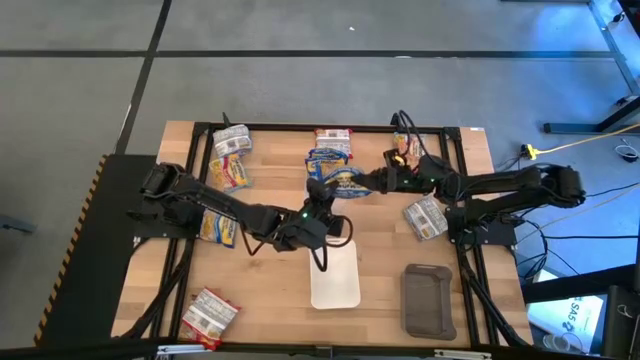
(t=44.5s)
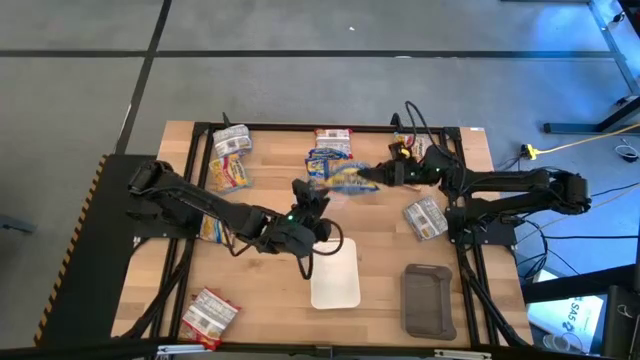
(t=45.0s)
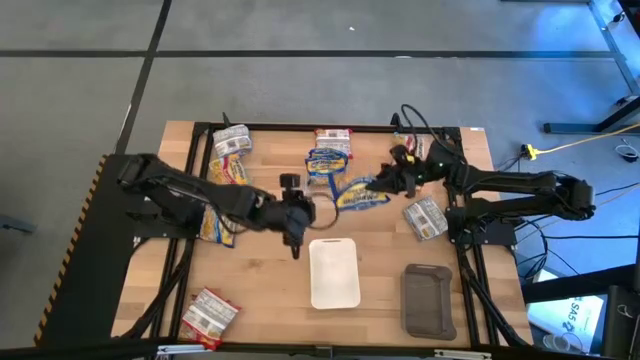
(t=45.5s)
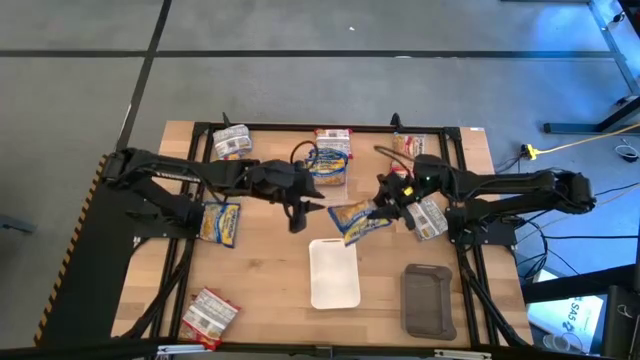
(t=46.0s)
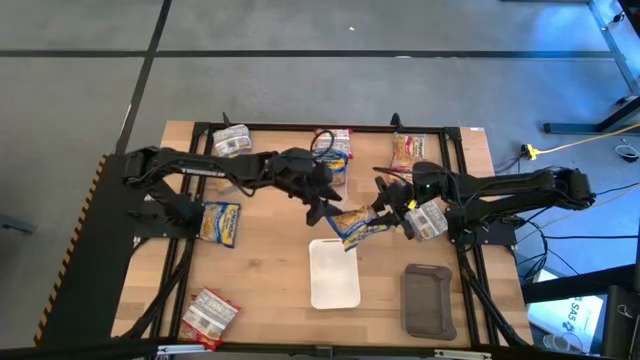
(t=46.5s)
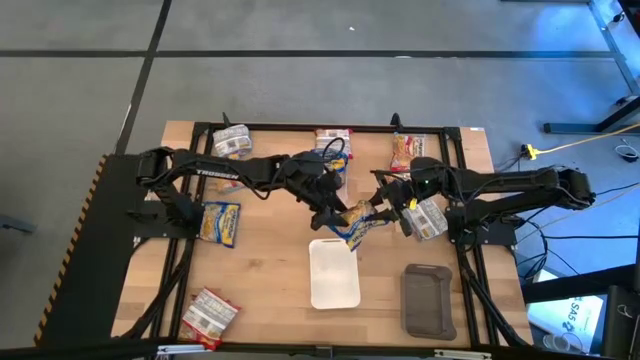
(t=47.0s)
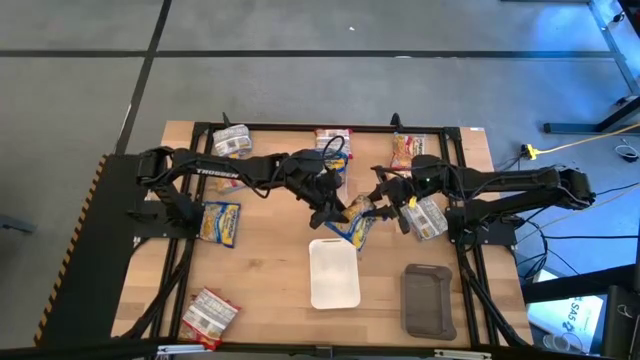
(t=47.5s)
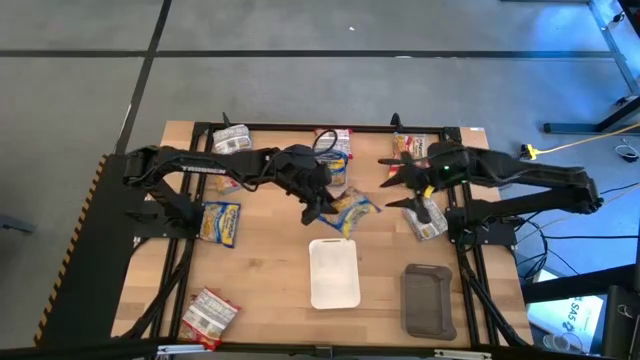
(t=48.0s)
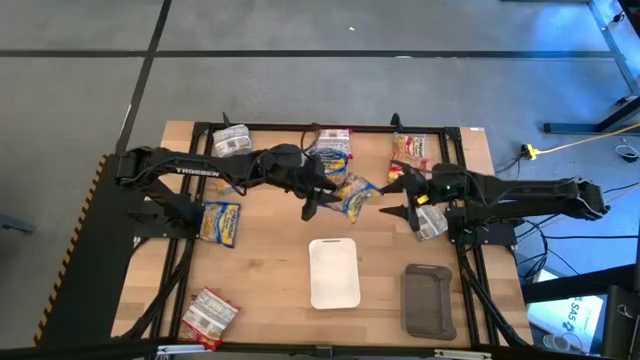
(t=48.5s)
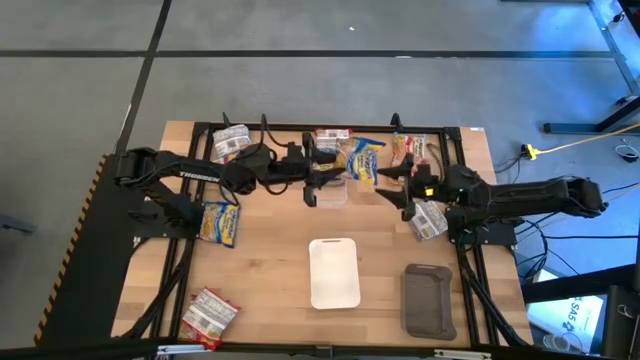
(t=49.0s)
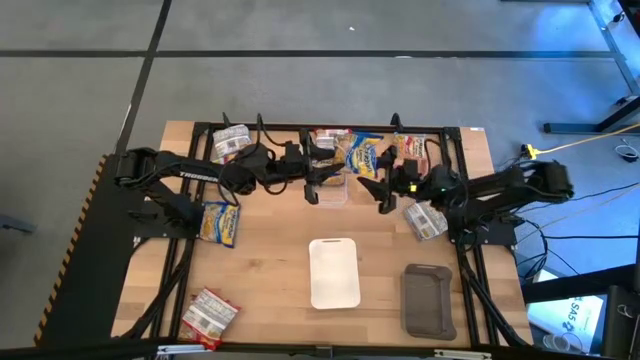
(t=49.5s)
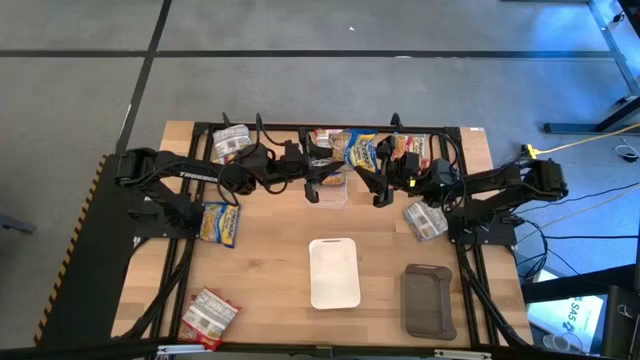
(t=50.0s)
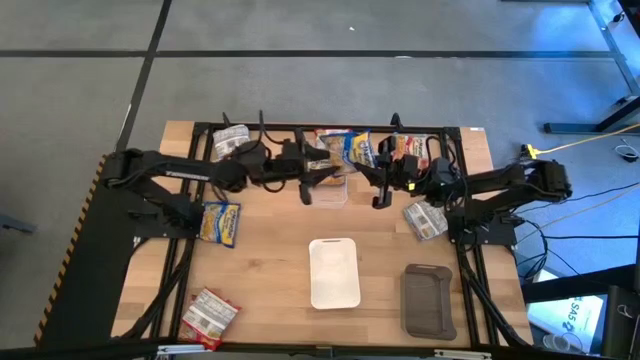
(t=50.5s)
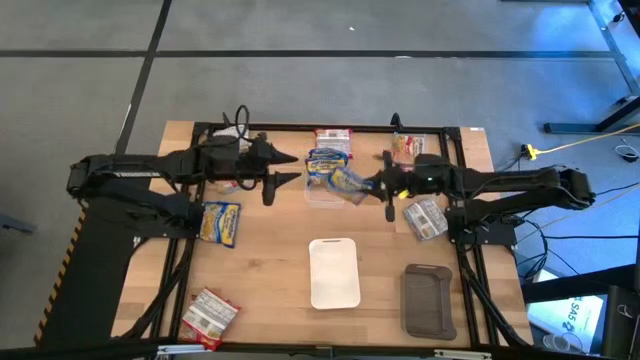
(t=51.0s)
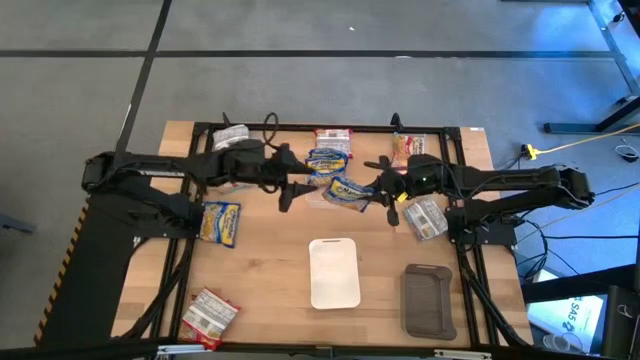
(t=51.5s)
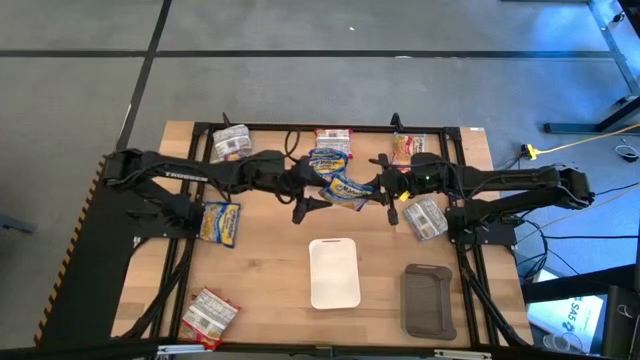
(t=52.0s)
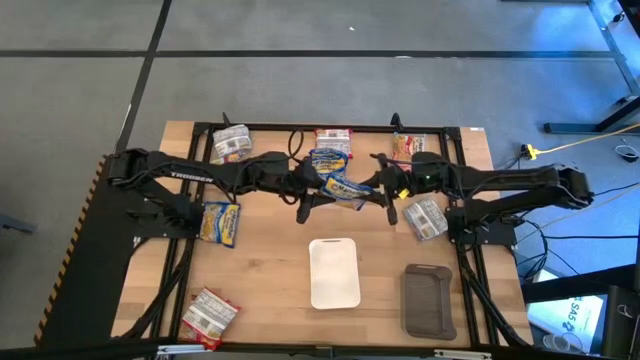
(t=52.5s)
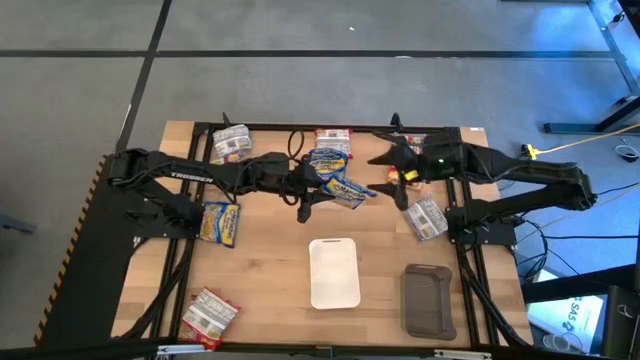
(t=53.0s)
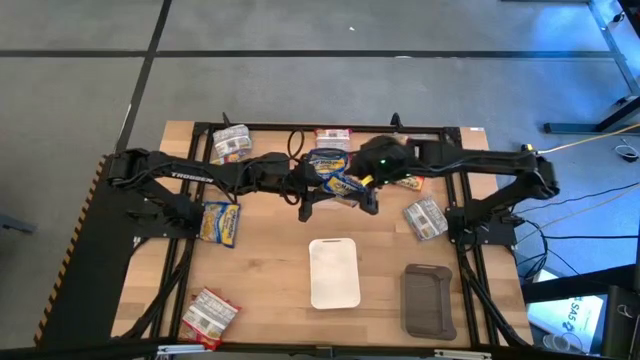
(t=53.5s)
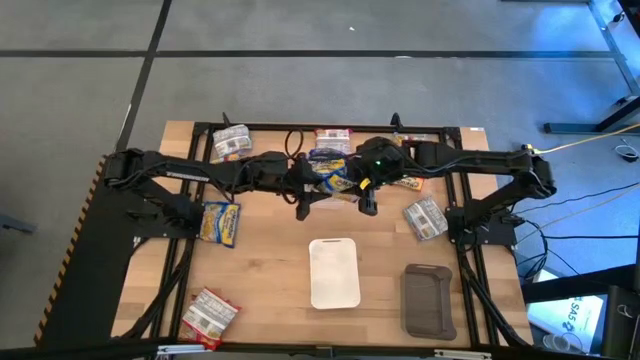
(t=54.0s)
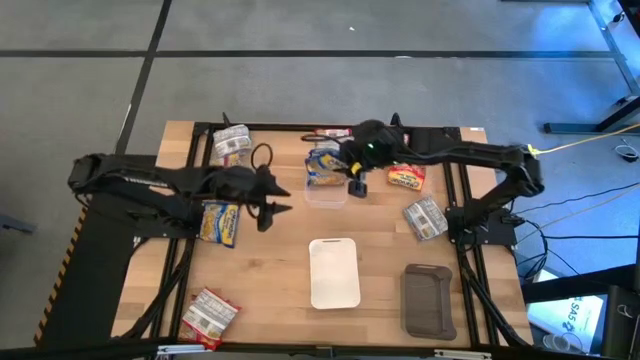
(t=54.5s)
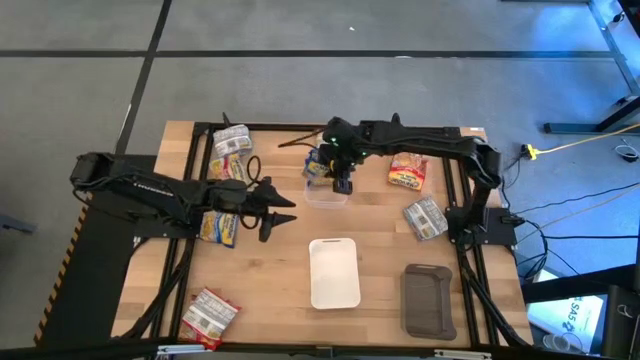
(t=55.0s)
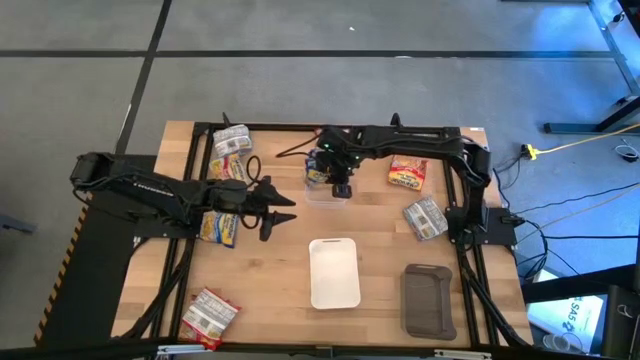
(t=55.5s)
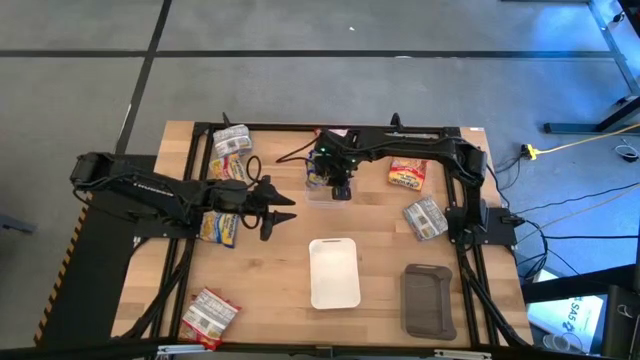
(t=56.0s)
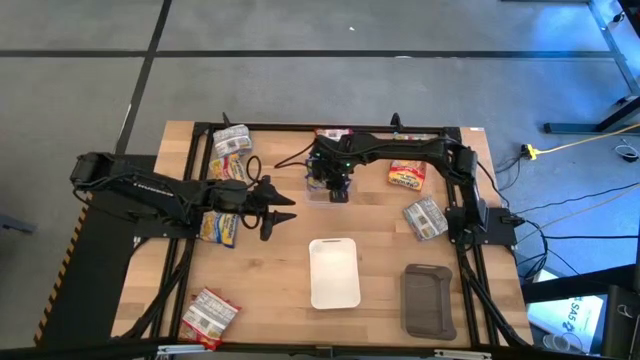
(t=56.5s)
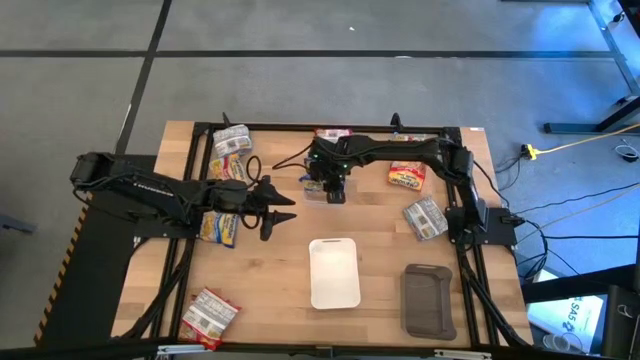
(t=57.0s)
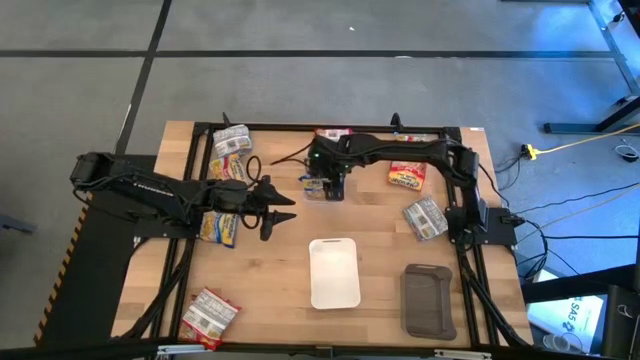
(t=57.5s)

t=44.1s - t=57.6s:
Task: Sort Maruchan noodles
Put the blue noodle pack into the transparent bin

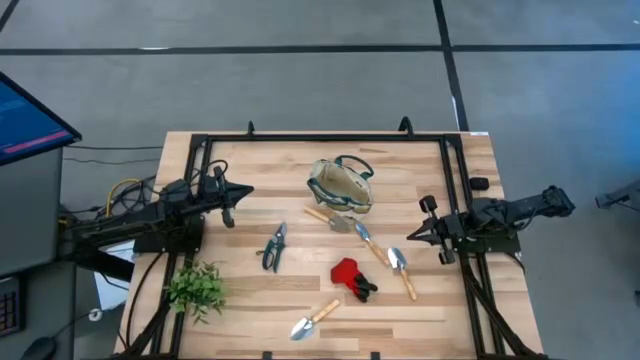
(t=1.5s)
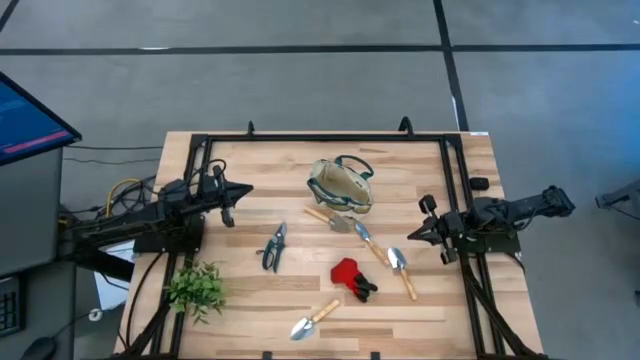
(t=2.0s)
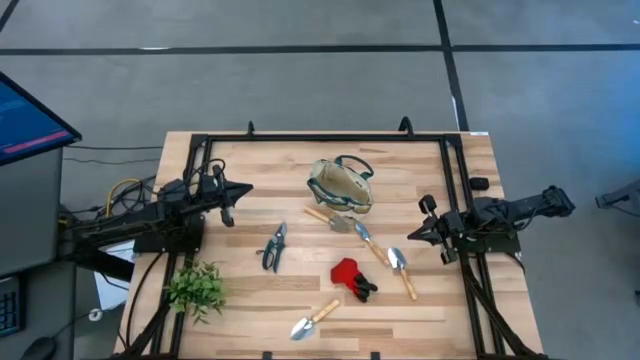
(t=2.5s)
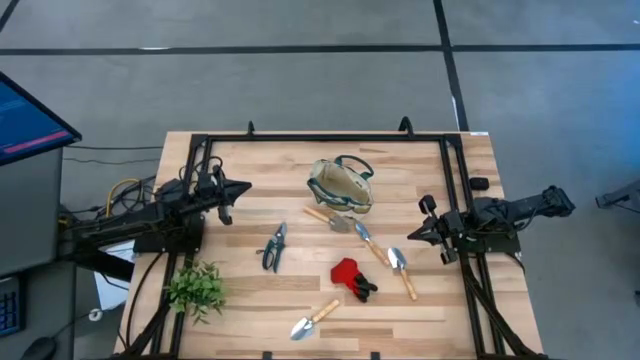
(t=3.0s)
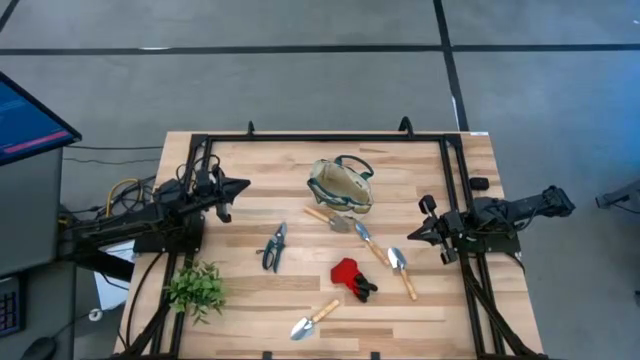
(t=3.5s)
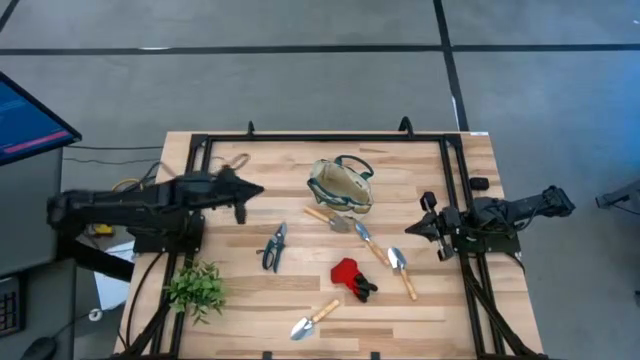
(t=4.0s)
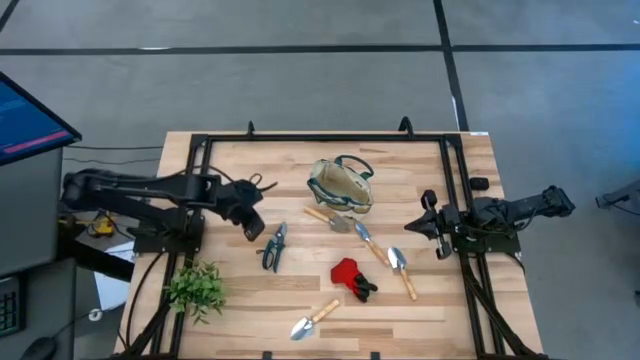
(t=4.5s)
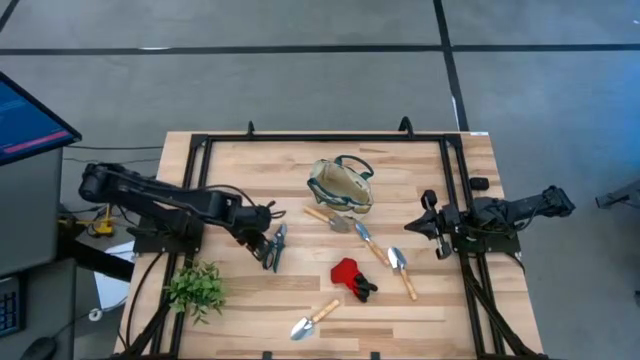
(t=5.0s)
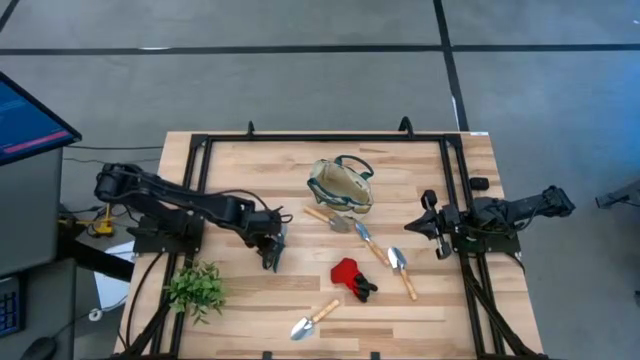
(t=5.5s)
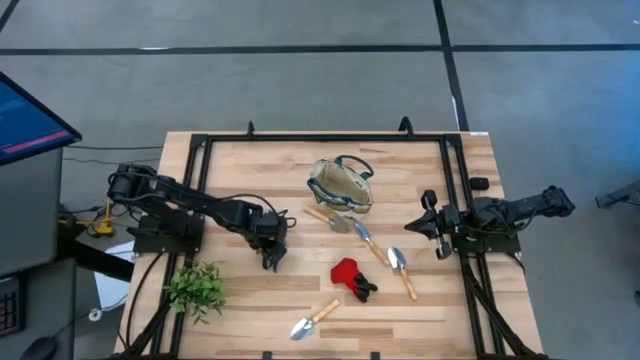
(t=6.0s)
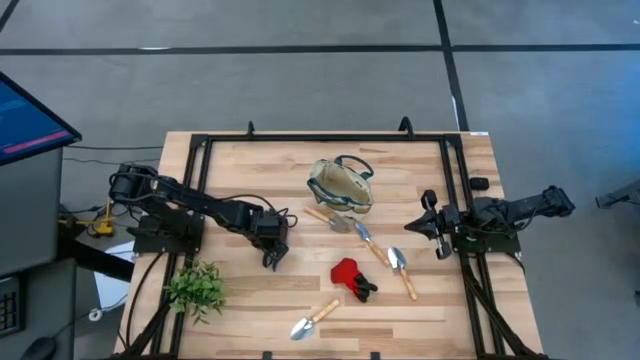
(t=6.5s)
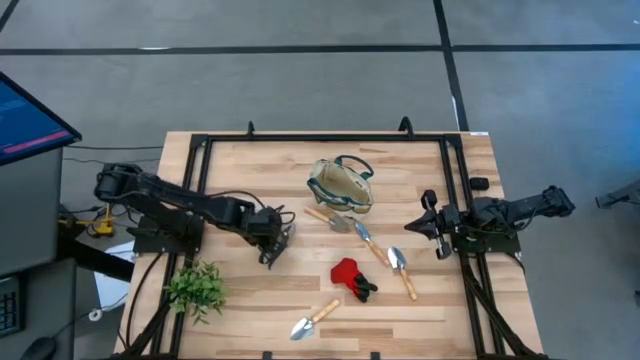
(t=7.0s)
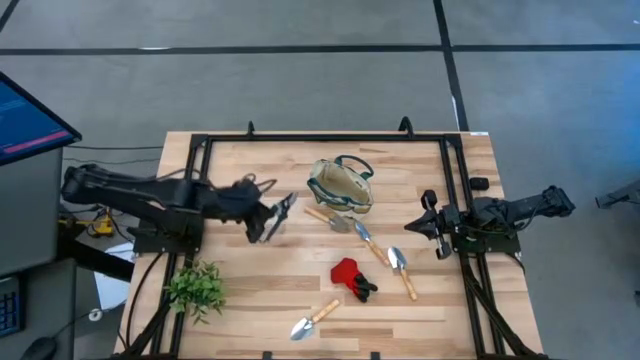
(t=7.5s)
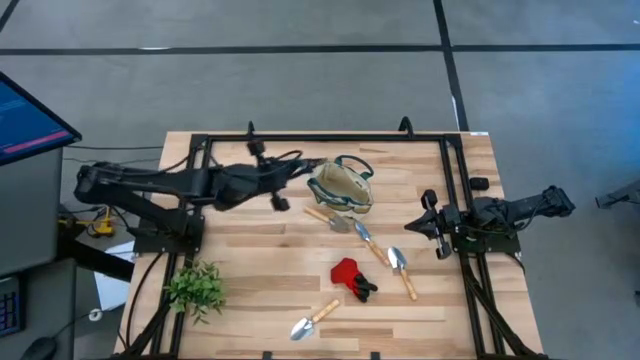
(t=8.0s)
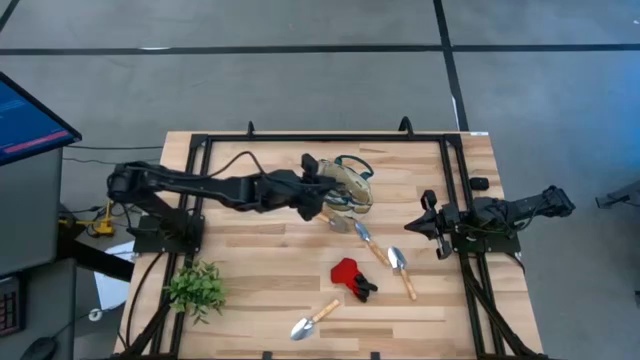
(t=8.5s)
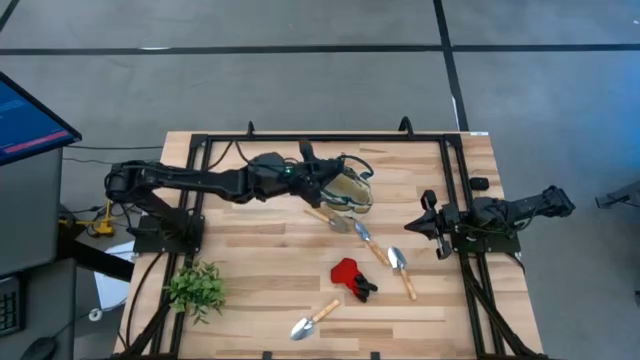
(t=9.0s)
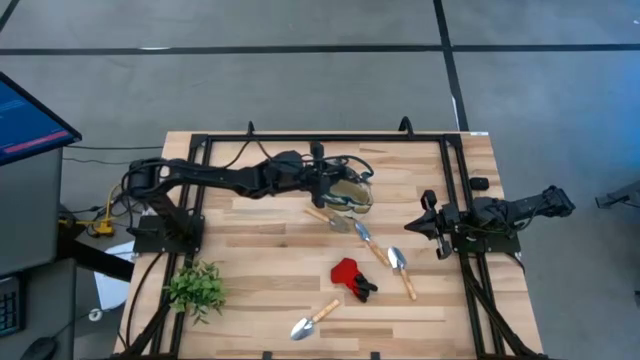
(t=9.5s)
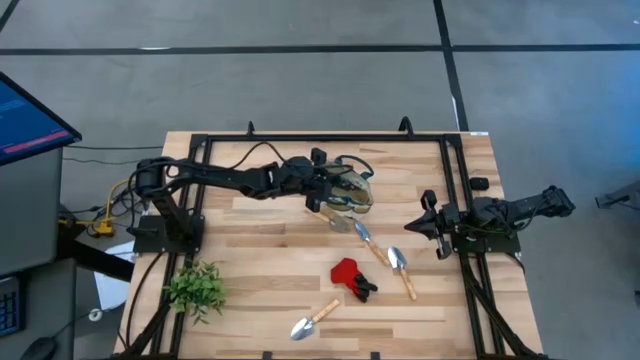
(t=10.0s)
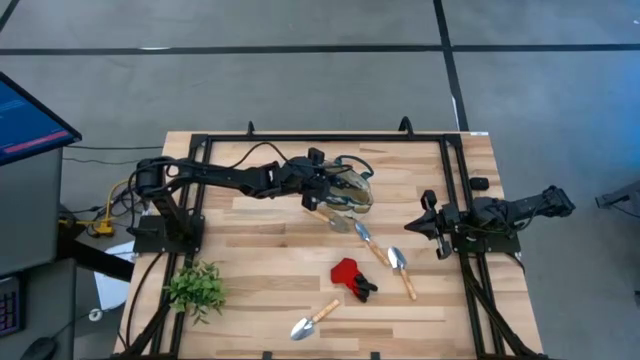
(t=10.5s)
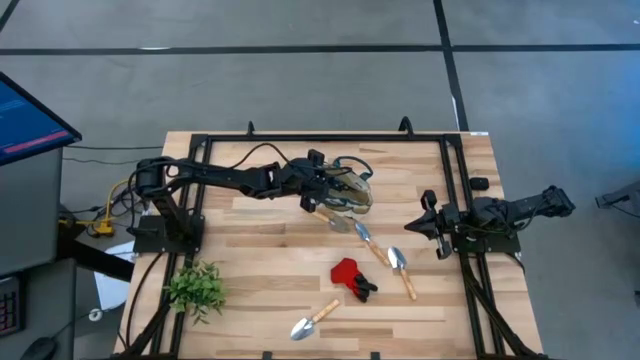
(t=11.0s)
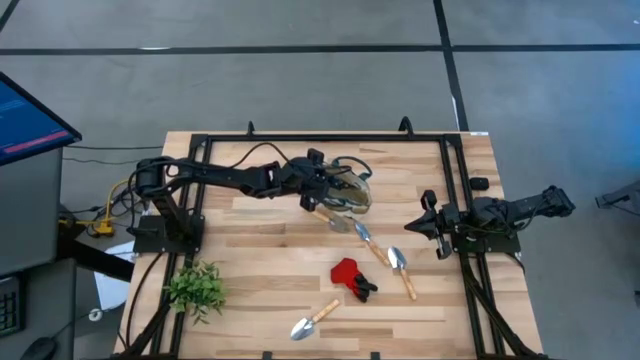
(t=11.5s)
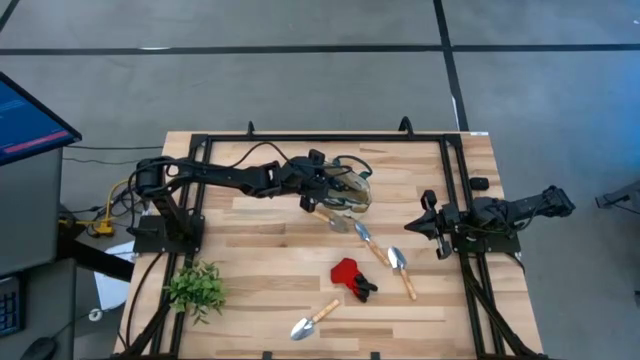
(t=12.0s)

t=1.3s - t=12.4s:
Task: Pick & Place Garden tools in Gardening bag
Put the green shears into the gardening bag
